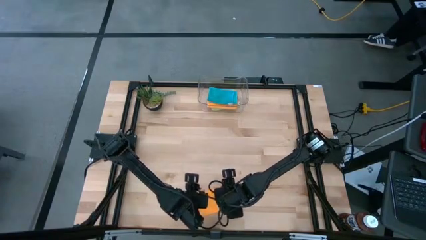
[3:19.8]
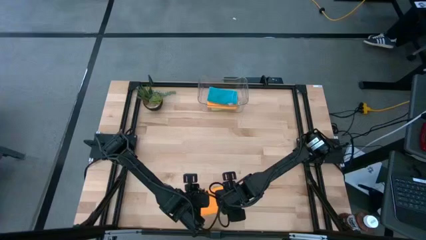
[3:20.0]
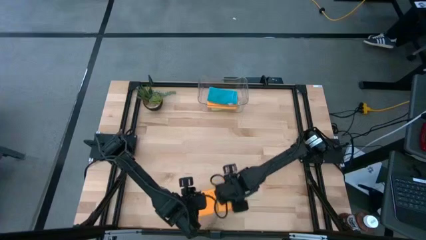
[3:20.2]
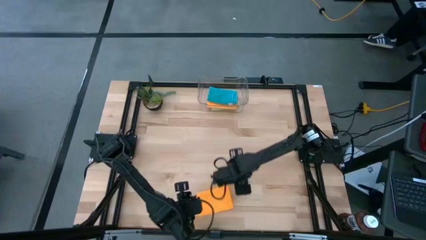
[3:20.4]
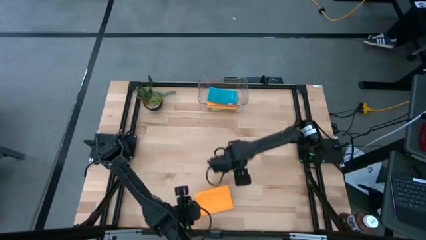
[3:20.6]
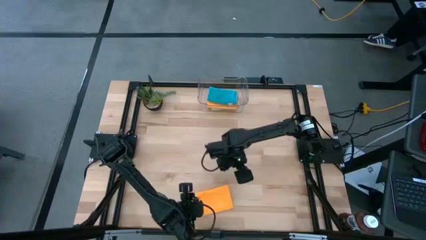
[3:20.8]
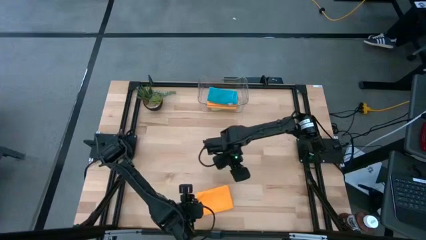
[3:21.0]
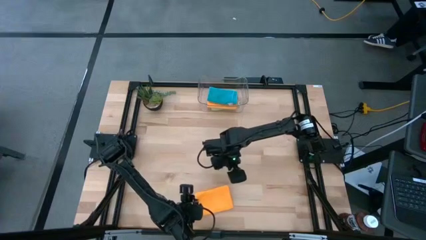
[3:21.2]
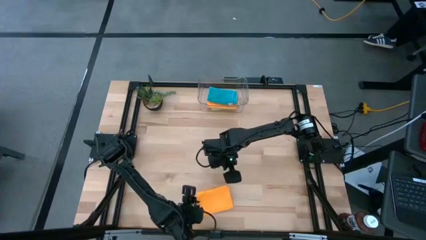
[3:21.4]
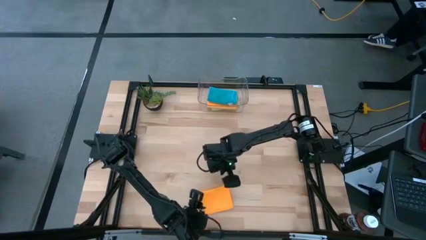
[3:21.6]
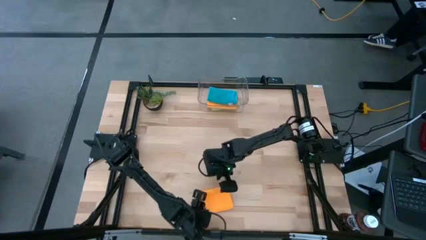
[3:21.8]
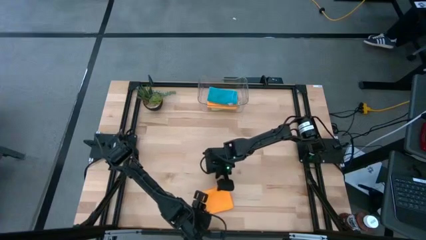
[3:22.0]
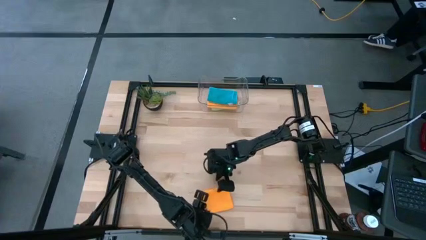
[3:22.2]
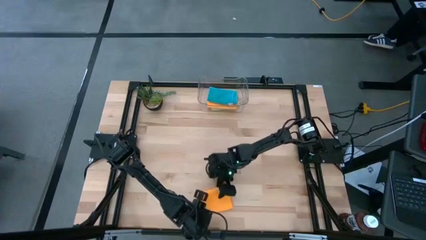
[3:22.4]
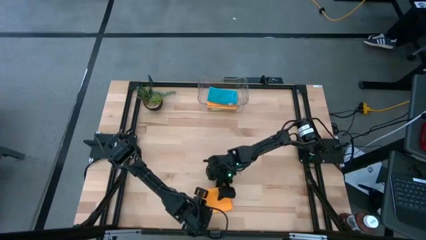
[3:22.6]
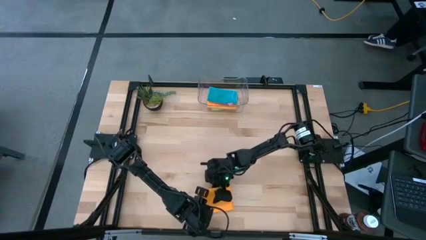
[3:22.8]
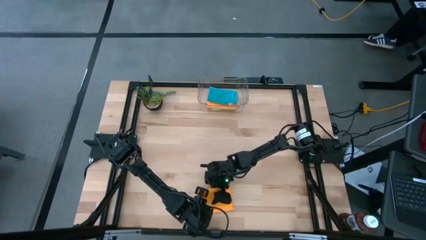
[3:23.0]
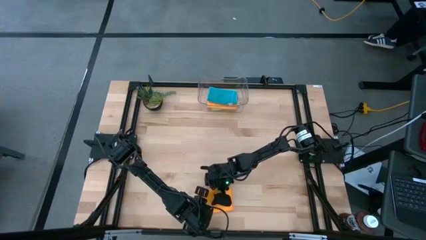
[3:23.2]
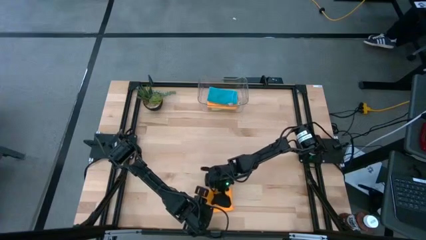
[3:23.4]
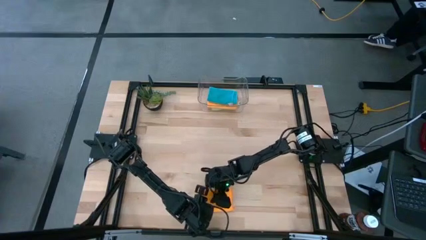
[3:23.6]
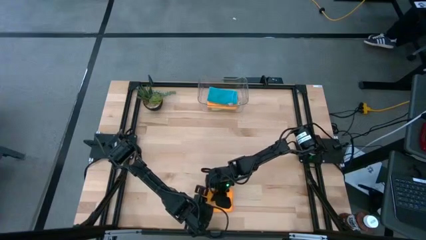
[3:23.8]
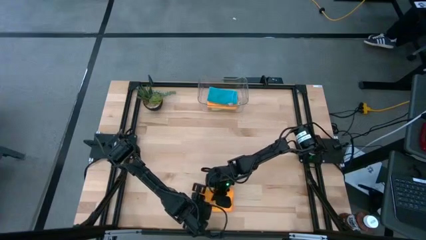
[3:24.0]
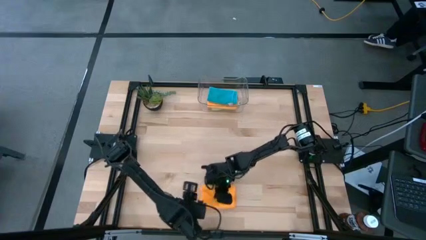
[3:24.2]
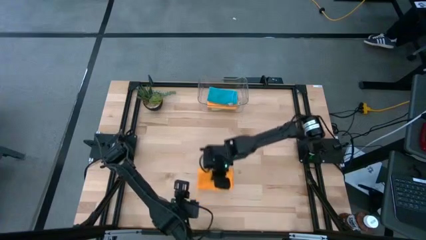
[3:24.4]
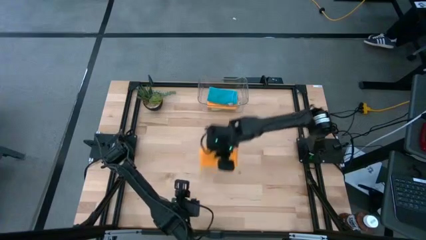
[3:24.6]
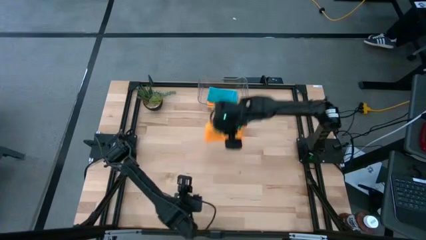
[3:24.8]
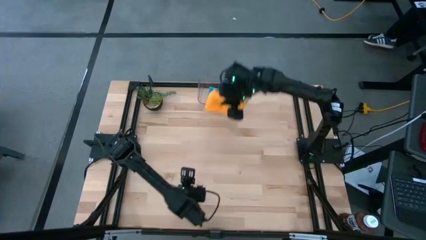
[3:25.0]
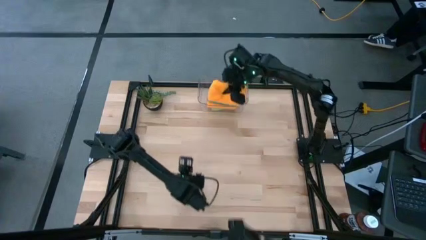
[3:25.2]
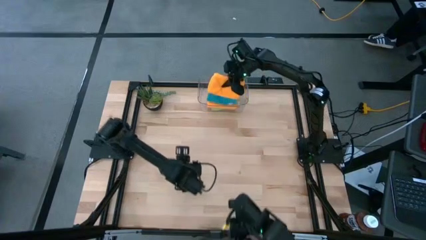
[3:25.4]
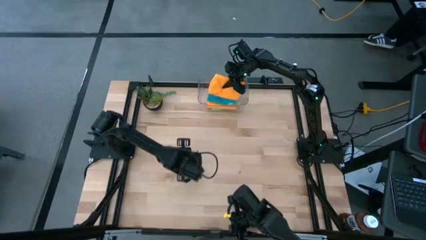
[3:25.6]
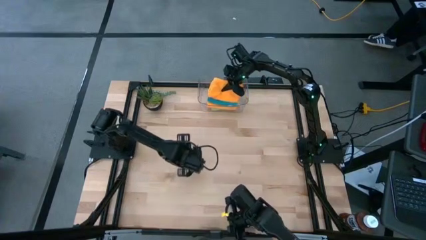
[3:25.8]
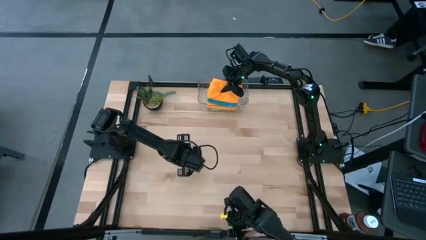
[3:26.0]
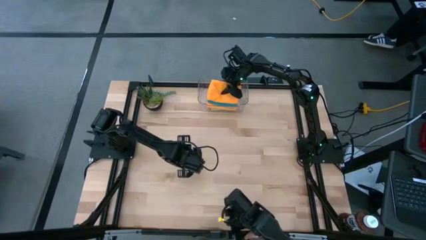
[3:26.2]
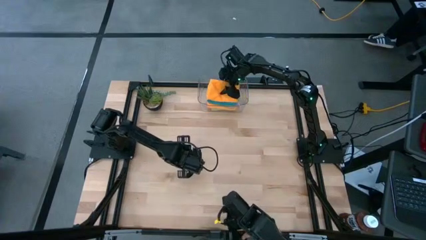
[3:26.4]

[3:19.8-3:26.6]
Task: Fold microfiber towels
Put the orange microfiber cloth into the transparent bin

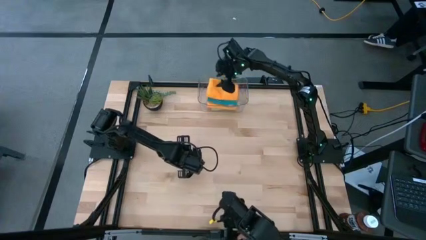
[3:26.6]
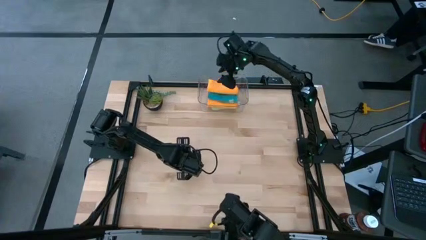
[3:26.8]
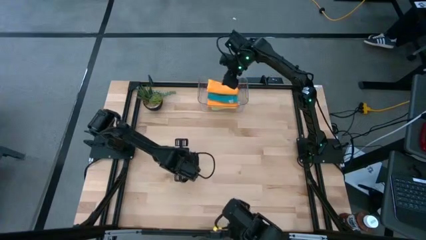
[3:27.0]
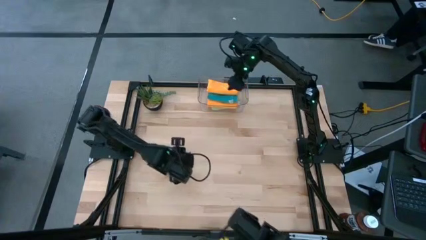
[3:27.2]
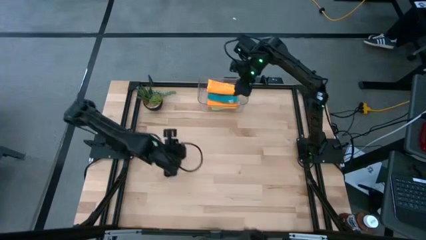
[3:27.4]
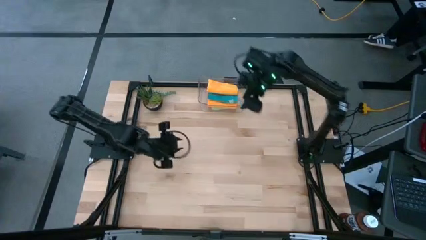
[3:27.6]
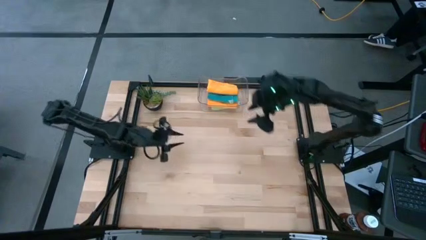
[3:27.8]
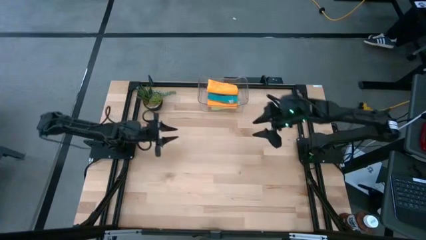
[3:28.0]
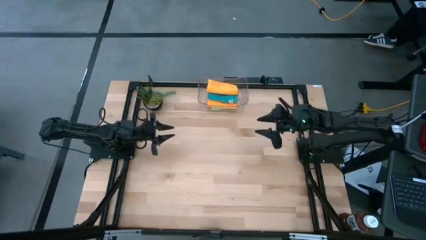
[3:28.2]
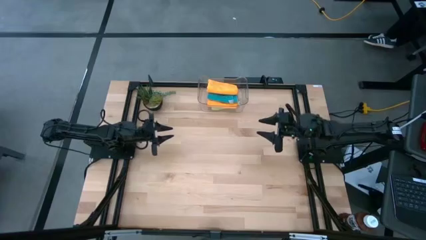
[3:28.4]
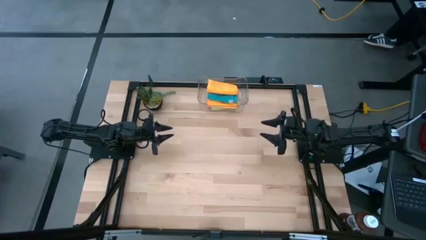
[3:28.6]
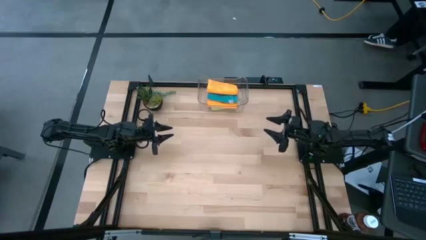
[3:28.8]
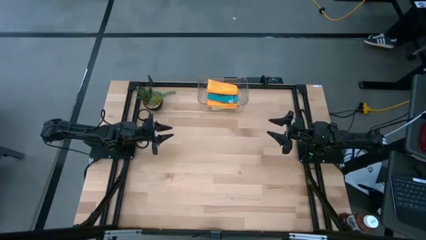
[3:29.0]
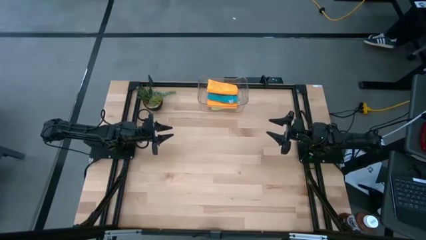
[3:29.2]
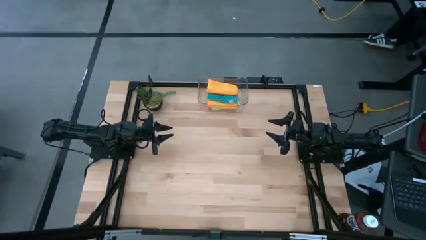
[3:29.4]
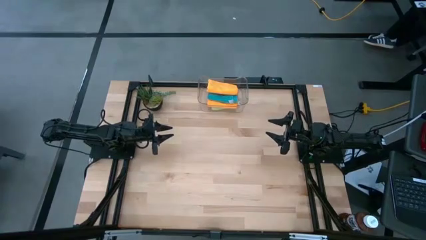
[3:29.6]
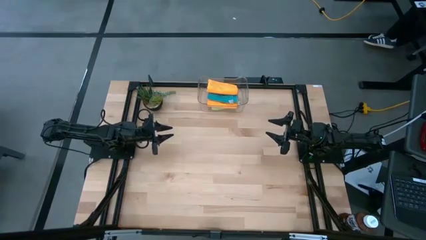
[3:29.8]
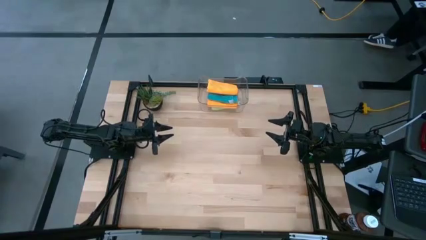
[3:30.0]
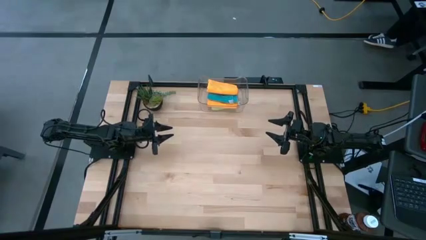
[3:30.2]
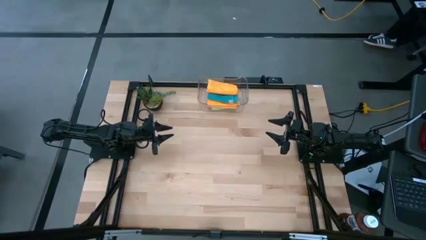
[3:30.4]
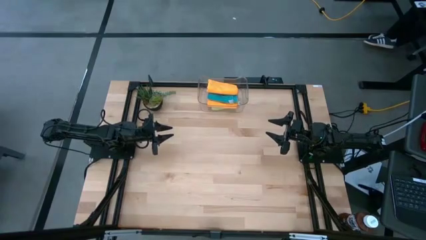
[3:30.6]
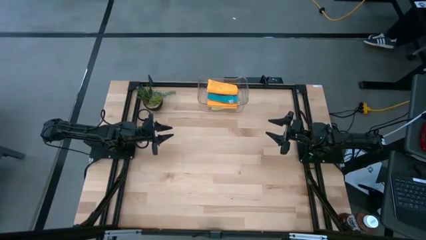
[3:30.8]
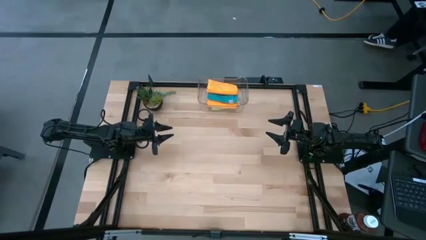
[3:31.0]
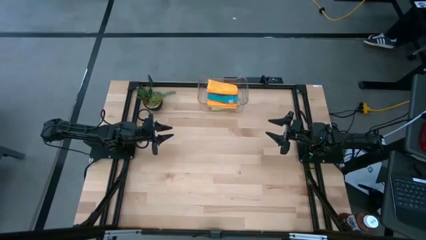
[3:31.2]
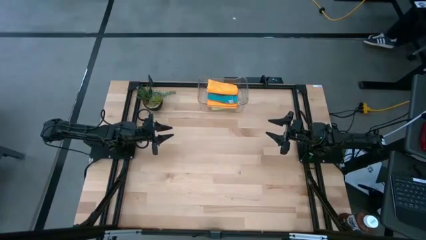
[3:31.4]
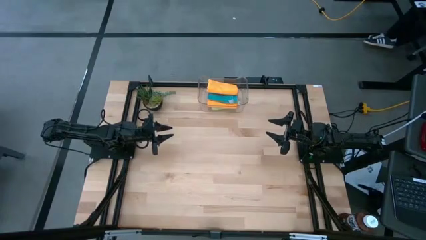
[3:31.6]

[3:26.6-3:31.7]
Return to Home Position

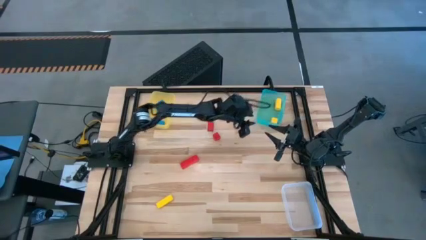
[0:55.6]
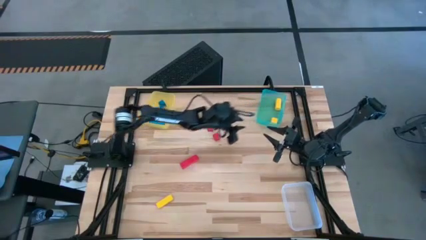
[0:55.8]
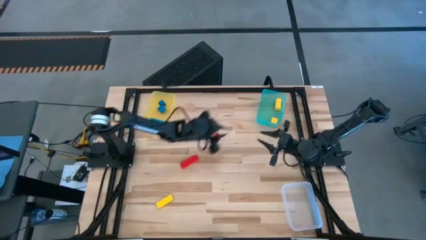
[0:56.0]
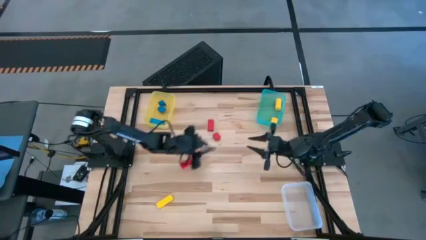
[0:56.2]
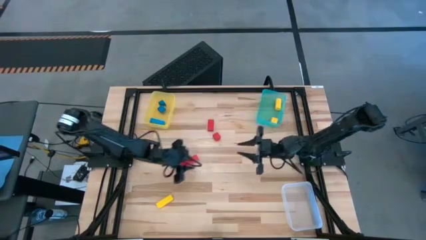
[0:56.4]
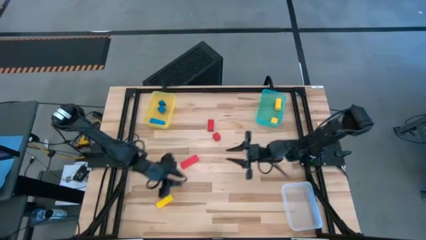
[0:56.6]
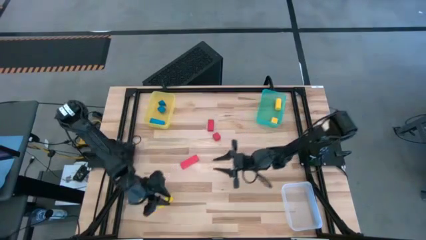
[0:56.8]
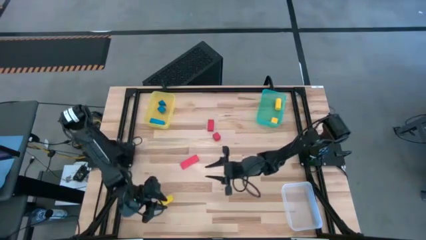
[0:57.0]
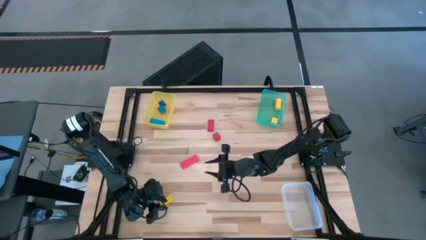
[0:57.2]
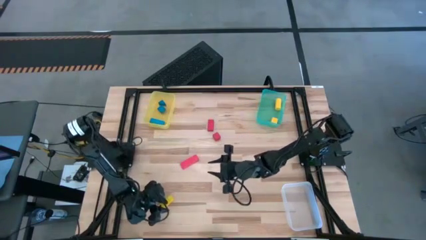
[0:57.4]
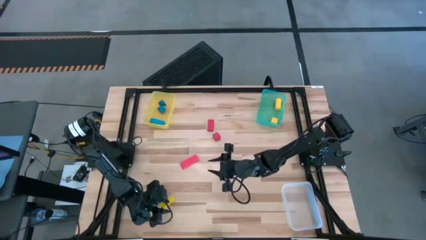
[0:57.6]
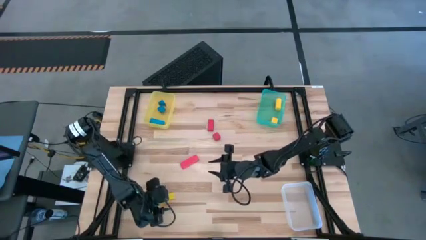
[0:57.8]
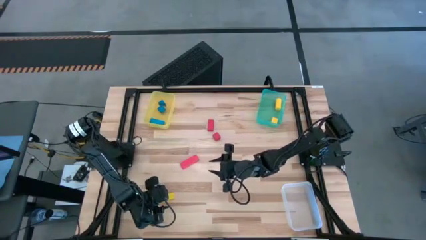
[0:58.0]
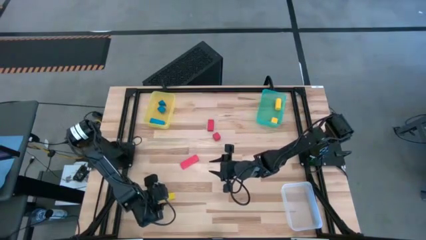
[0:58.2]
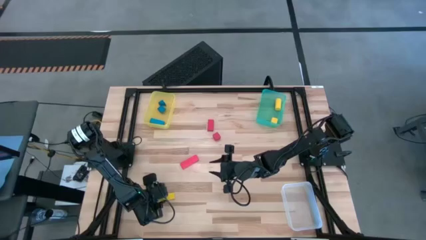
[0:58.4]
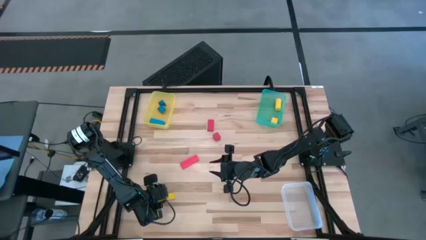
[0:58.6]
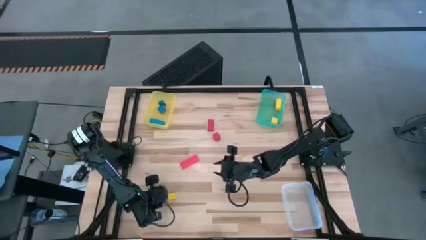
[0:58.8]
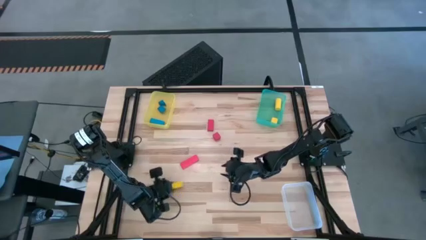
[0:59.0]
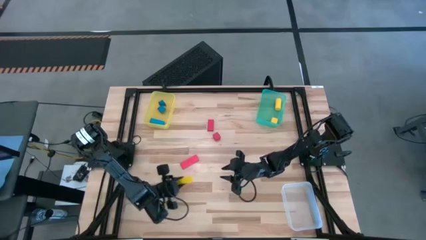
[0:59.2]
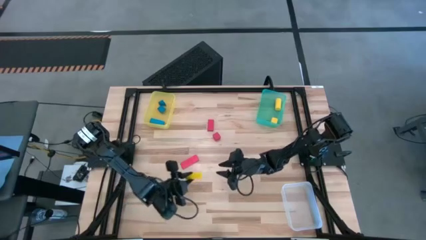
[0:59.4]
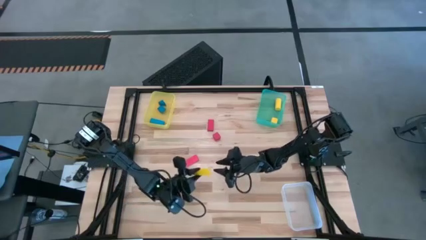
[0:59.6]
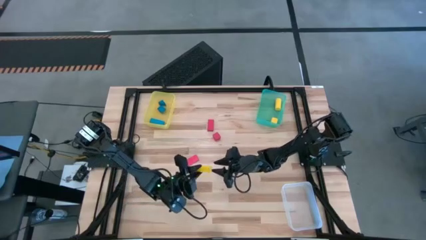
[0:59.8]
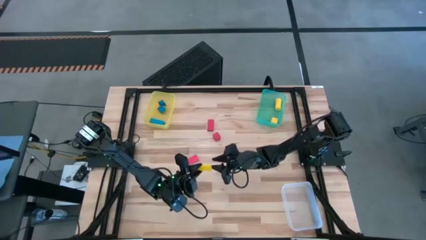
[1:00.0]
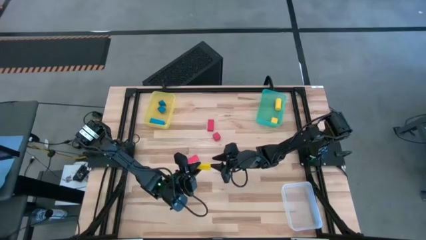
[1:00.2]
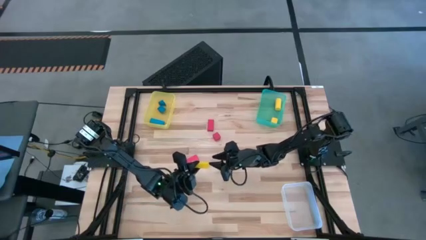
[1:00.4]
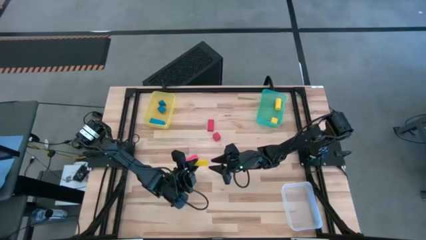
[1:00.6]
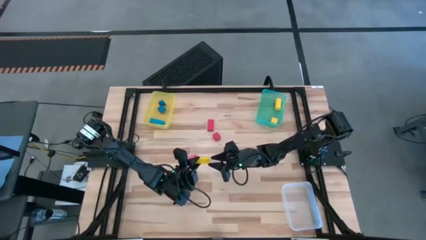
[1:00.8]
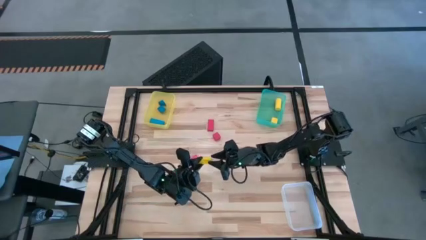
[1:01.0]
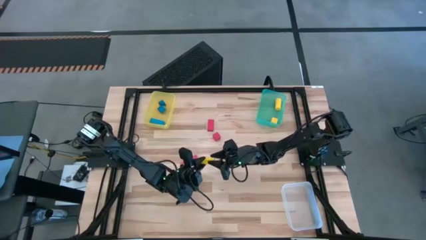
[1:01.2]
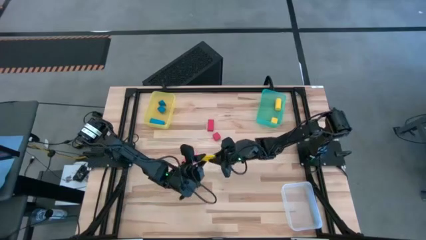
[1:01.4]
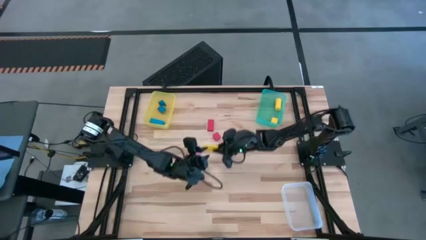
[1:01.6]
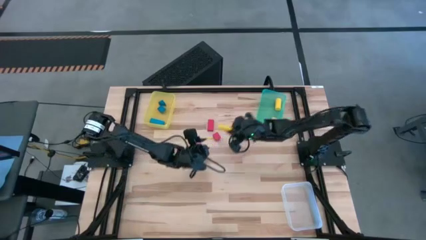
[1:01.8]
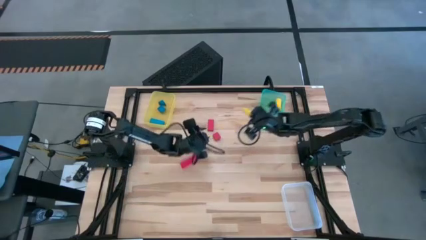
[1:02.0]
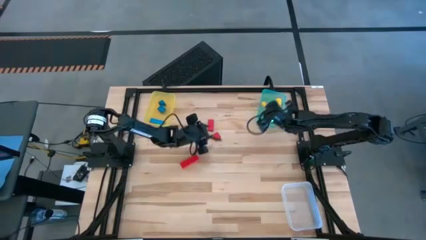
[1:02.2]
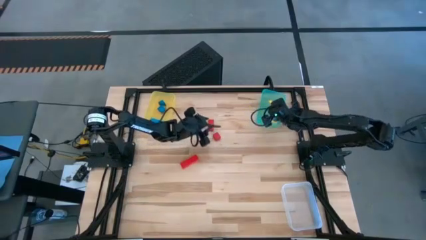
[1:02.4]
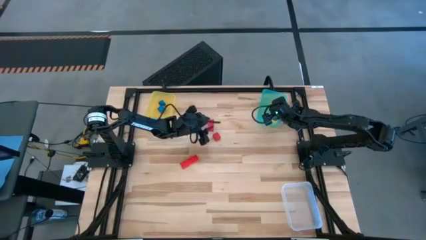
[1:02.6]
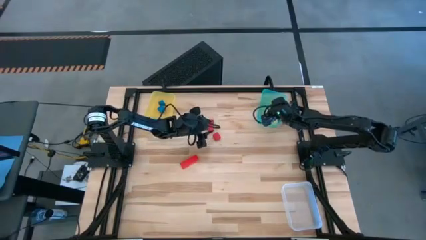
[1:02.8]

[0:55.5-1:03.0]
Task: Sort & place blocks by color
Put the yellow rectangle block into the light blue bin
